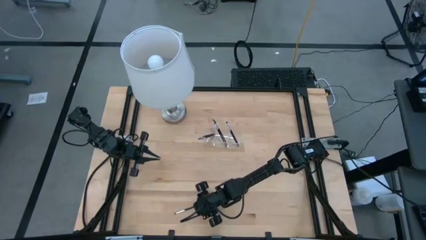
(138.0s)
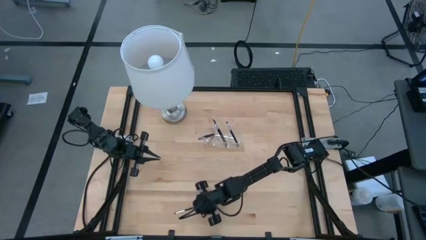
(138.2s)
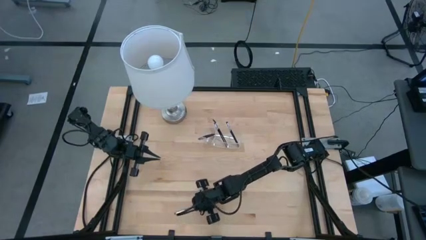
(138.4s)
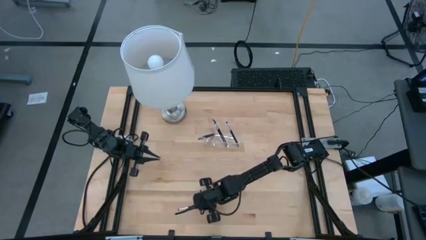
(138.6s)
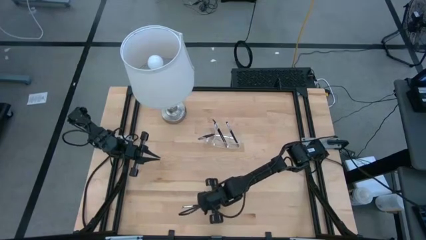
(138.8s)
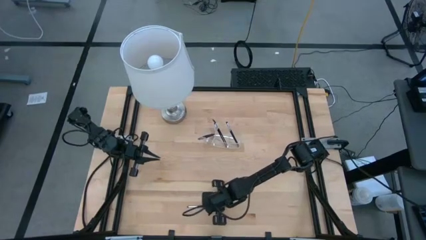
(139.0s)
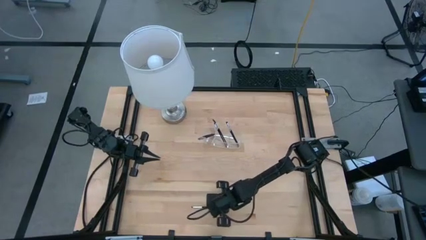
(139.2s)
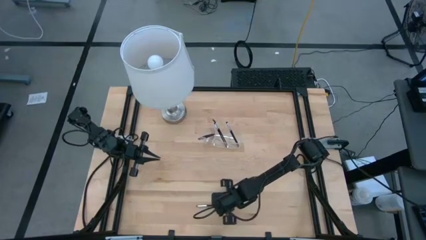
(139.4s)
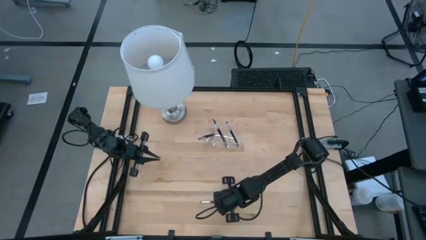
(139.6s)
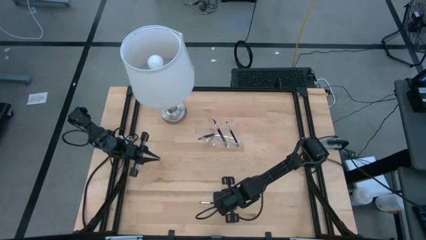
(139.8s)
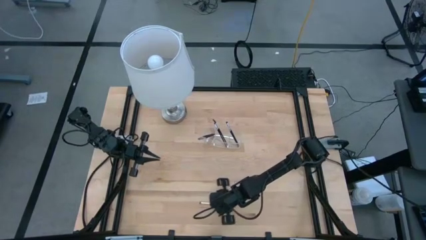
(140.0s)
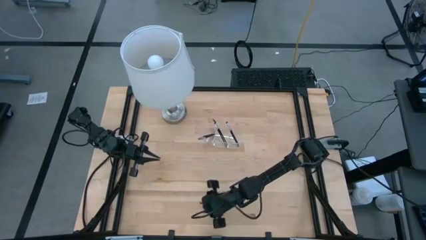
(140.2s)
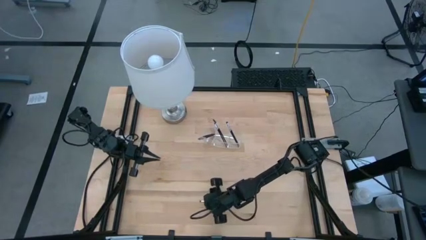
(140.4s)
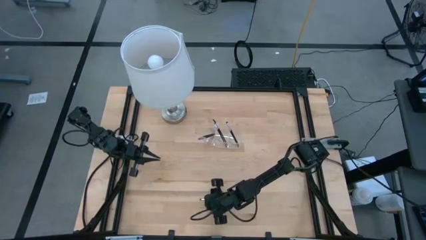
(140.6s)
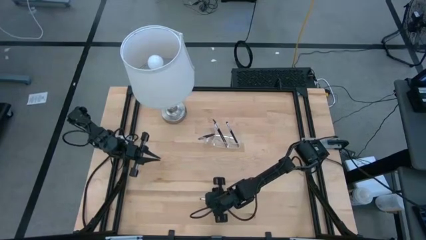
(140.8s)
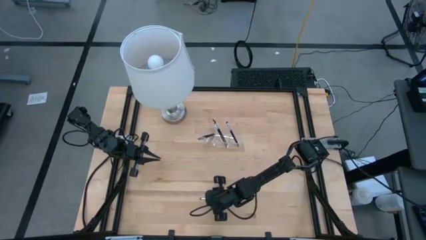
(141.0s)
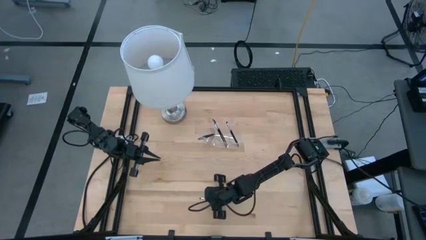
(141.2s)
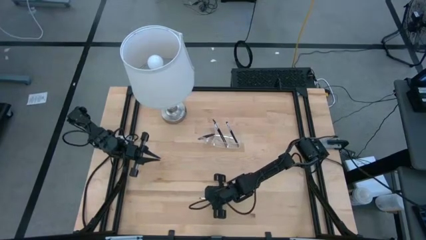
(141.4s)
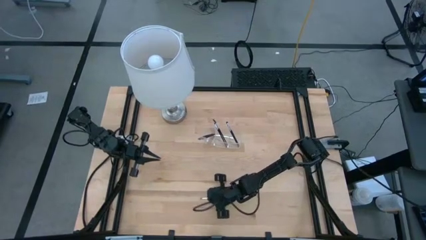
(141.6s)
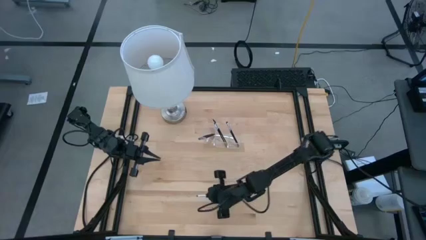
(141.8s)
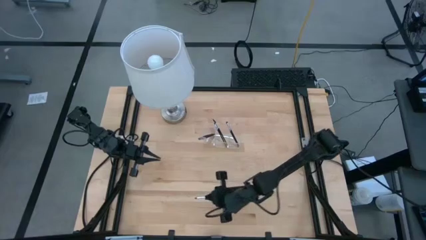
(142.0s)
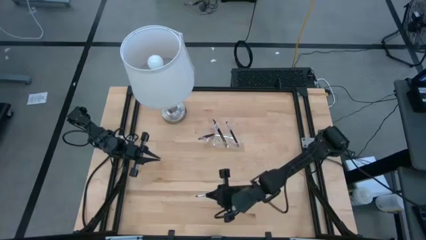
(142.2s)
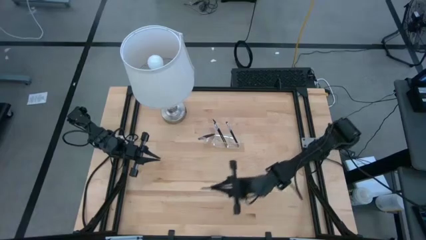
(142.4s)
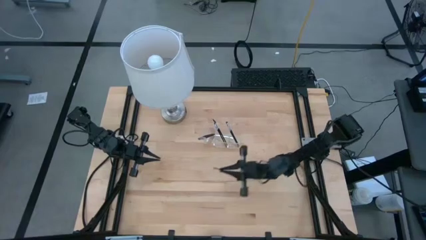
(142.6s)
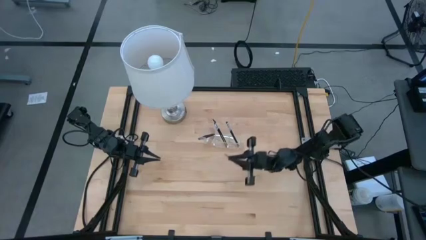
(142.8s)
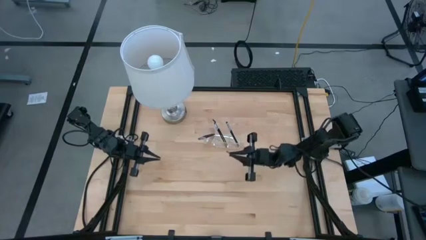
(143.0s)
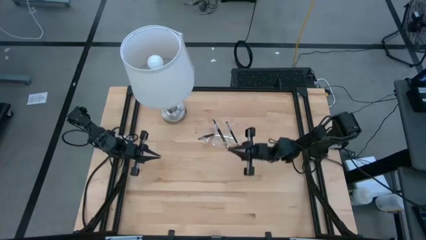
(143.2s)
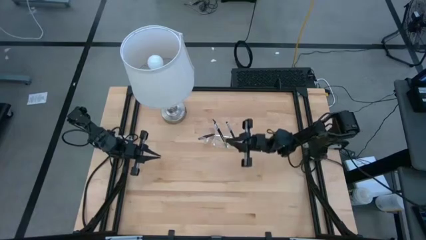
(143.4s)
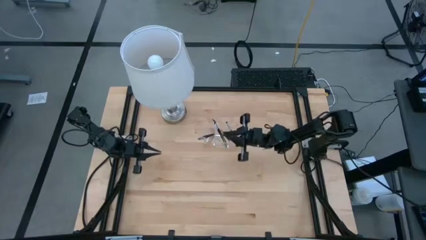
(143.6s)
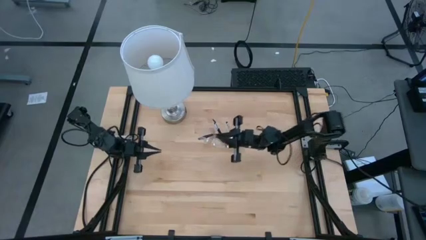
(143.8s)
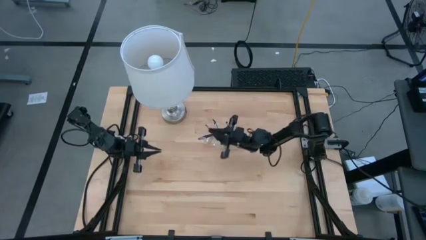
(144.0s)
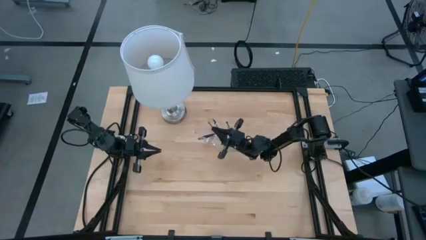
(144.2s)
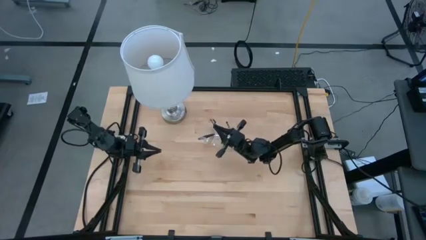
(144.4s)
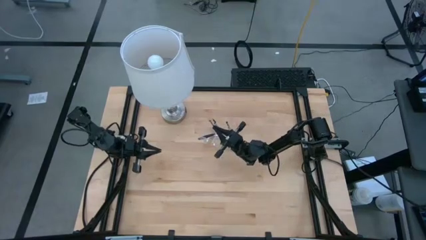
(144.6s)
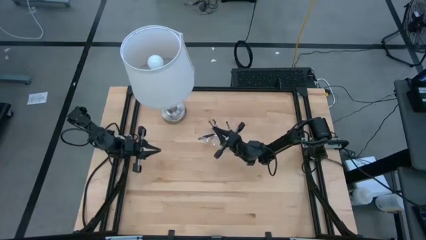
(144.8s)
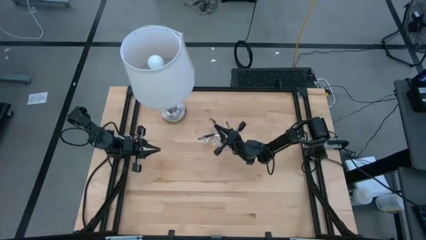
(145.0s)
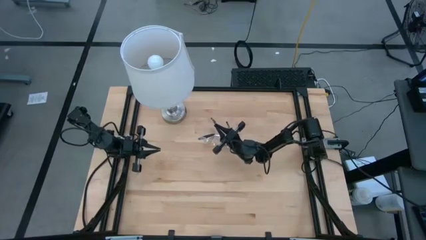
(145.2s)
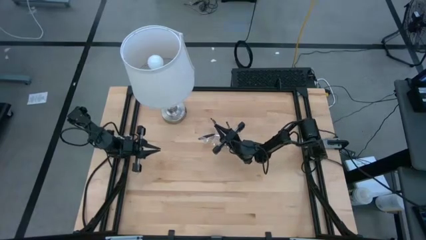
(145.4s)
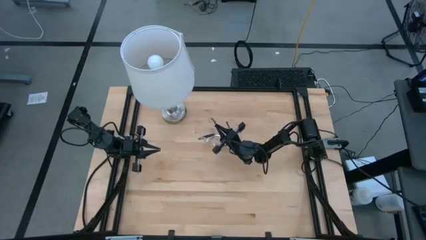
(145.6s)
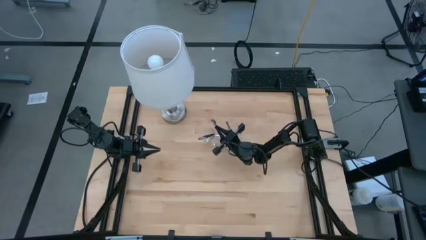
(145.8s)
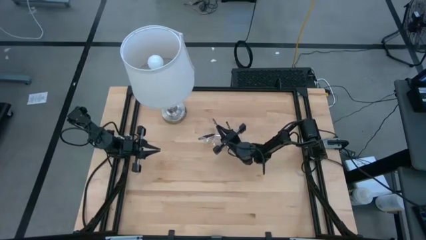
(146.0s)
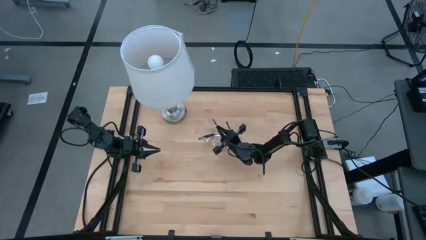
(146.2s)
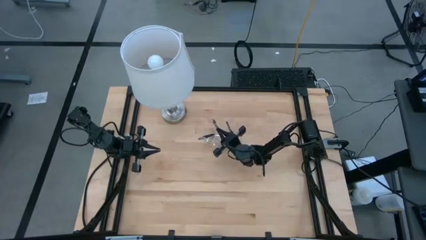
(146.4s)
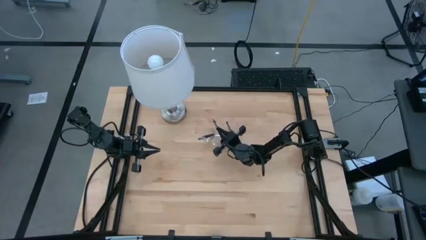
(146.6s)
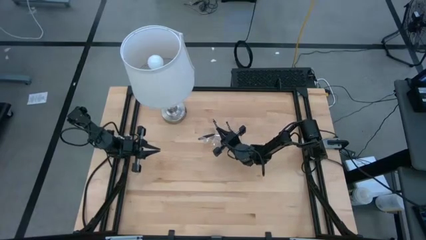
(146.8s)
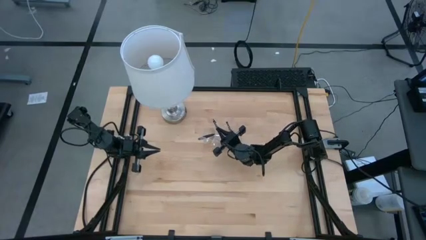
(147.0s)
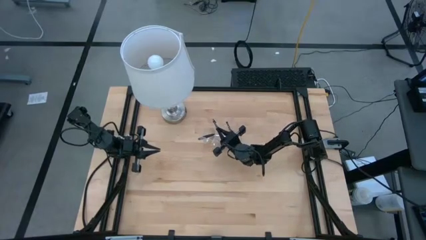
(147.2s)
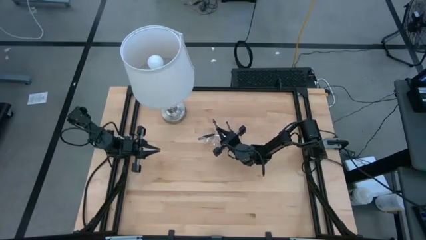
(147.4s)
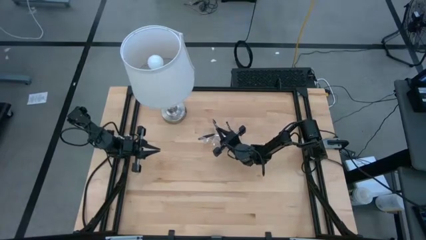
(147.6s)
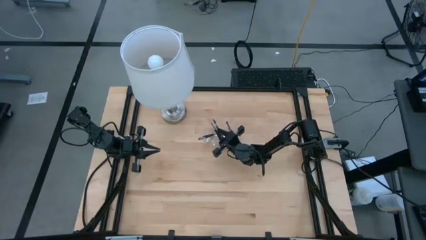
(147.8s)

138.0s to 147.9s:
Task: Sort items
Put the eyeshadow brush into the transparent organizer

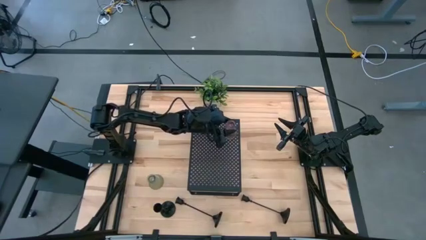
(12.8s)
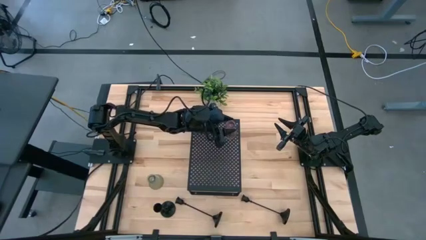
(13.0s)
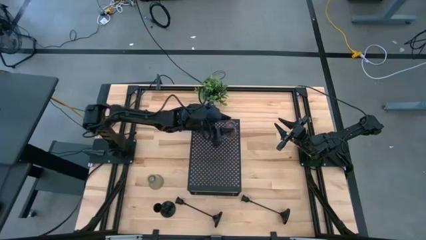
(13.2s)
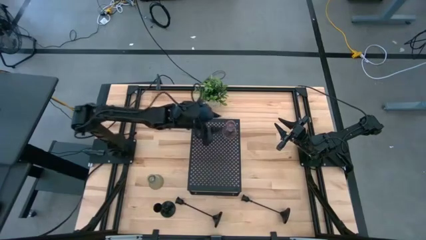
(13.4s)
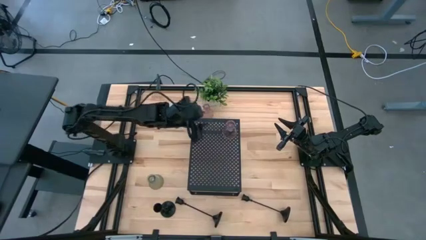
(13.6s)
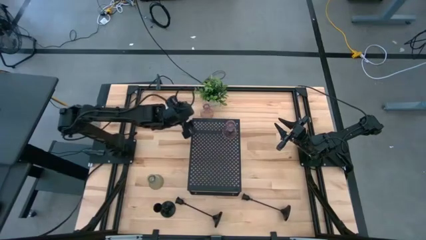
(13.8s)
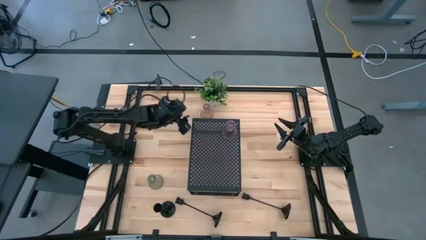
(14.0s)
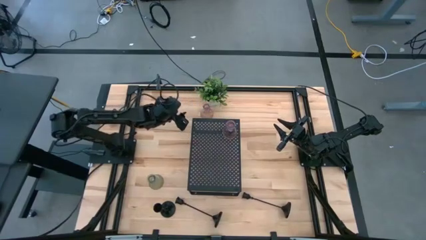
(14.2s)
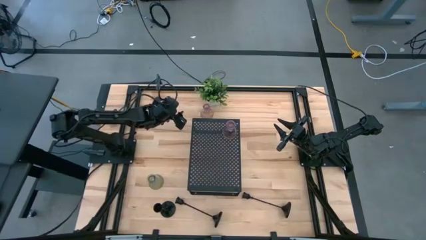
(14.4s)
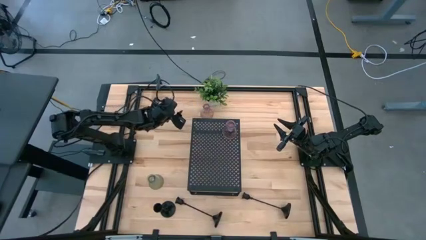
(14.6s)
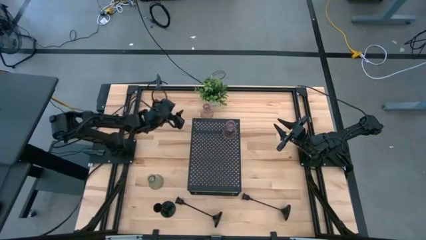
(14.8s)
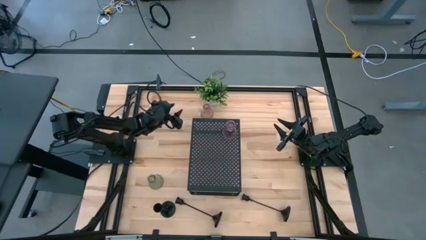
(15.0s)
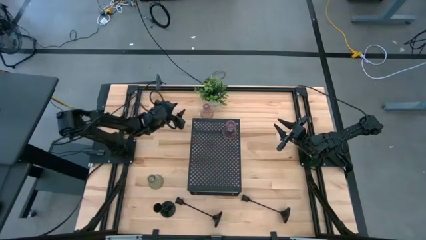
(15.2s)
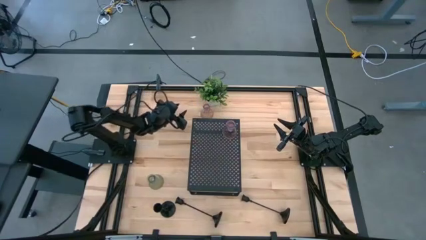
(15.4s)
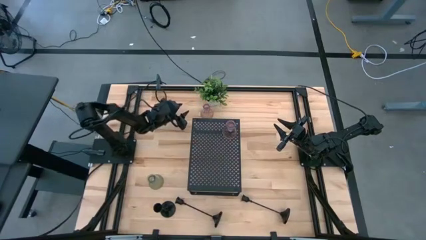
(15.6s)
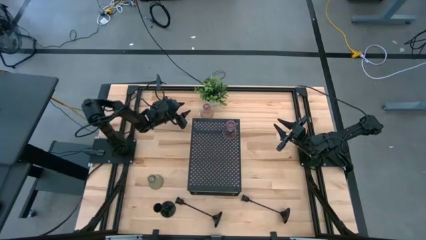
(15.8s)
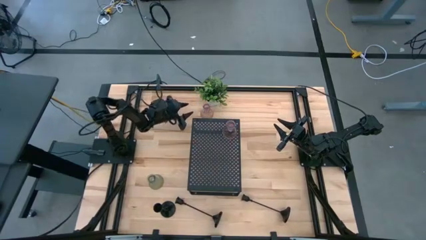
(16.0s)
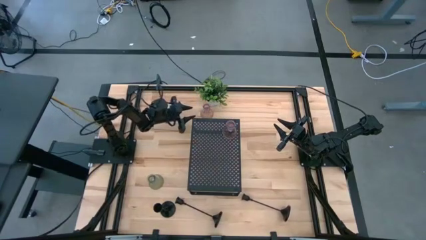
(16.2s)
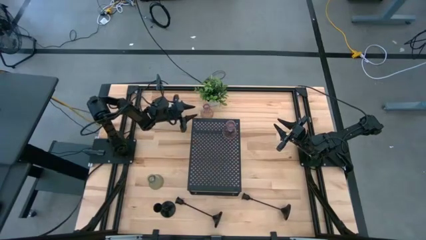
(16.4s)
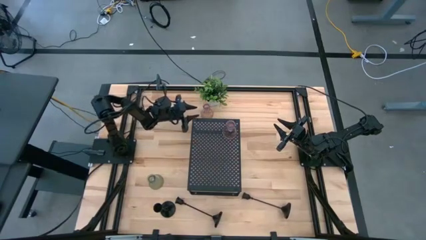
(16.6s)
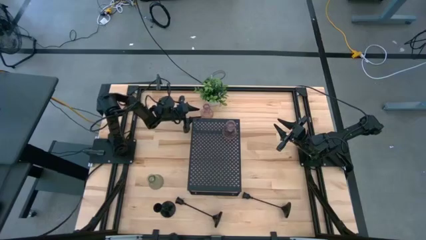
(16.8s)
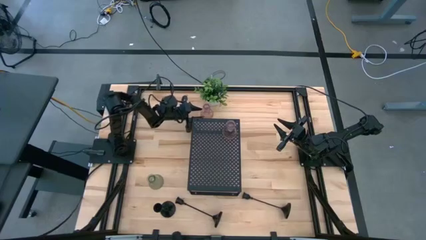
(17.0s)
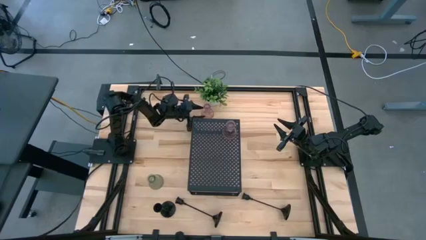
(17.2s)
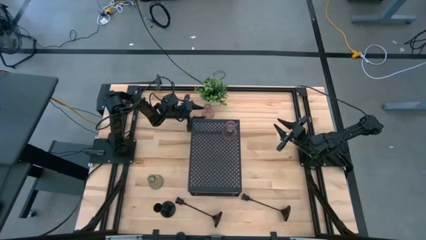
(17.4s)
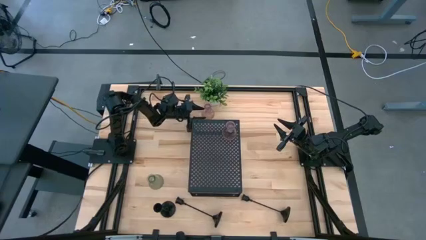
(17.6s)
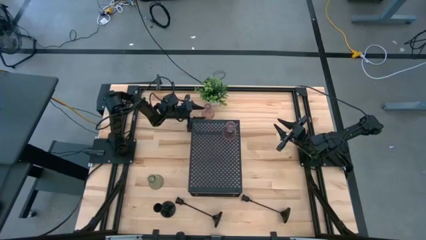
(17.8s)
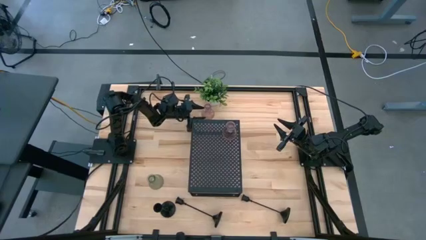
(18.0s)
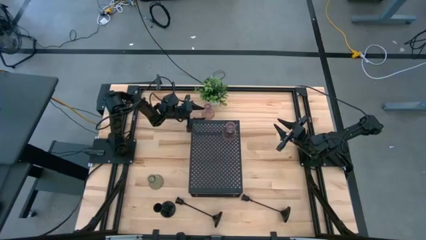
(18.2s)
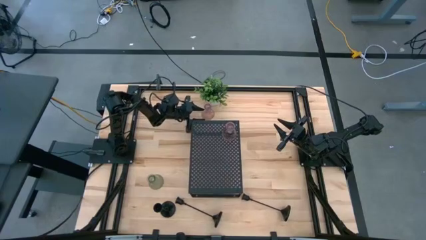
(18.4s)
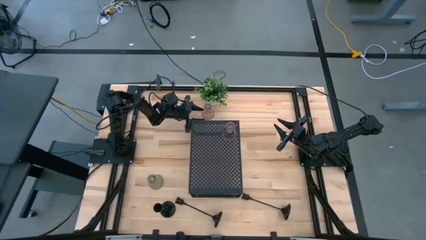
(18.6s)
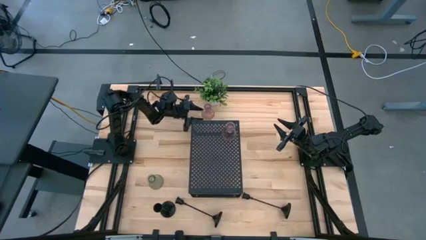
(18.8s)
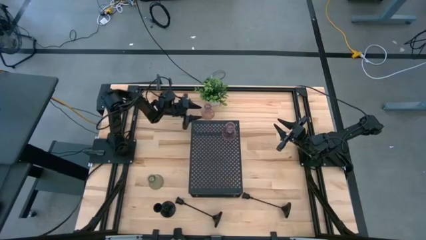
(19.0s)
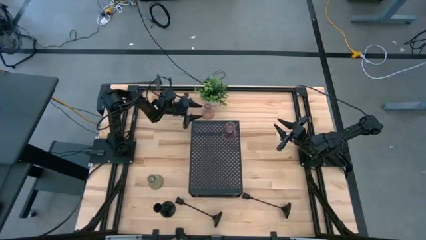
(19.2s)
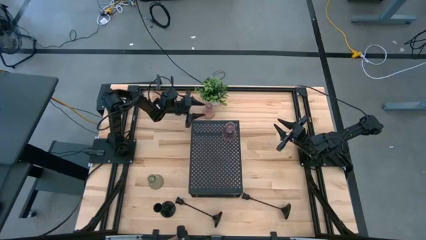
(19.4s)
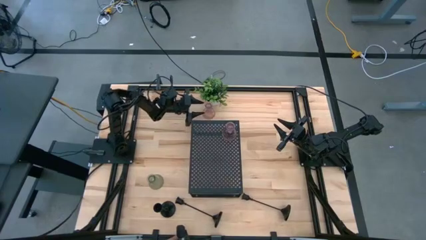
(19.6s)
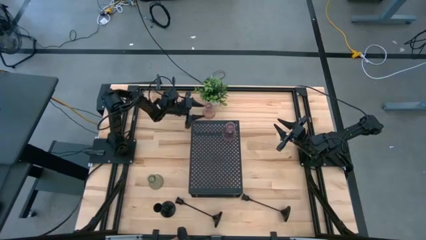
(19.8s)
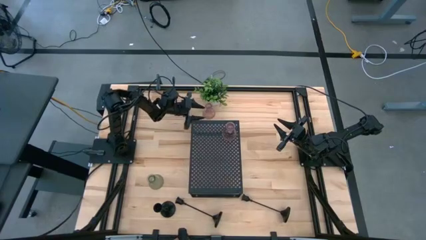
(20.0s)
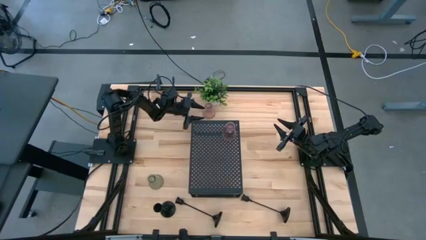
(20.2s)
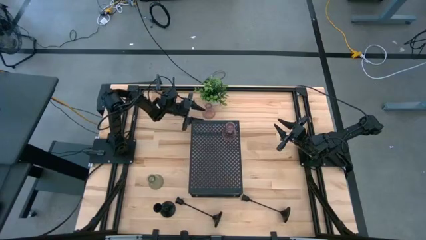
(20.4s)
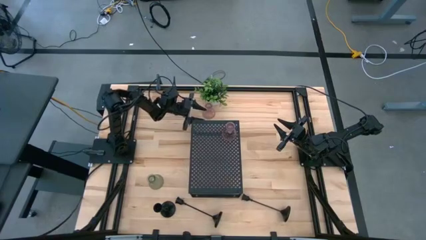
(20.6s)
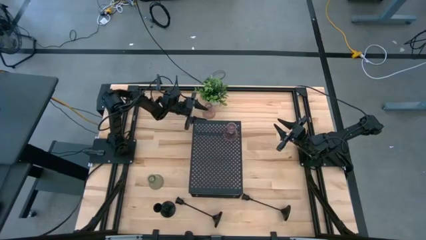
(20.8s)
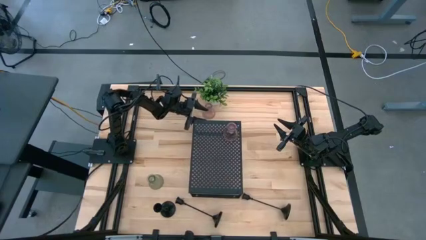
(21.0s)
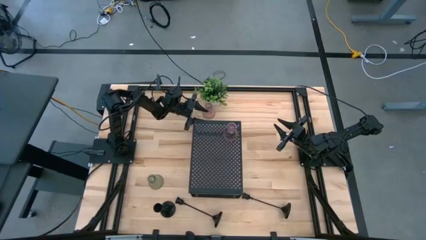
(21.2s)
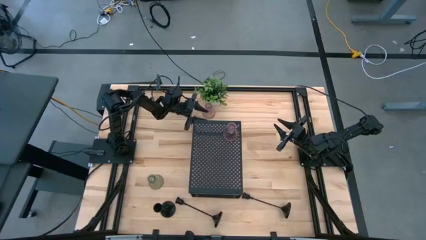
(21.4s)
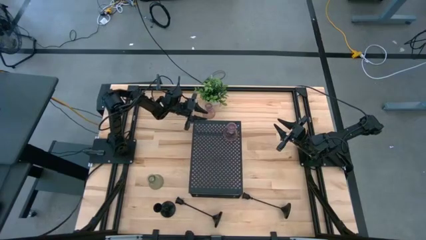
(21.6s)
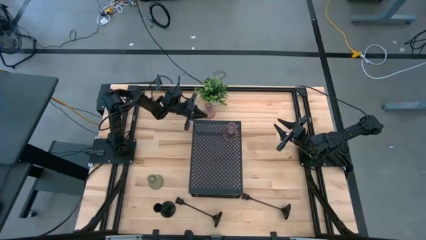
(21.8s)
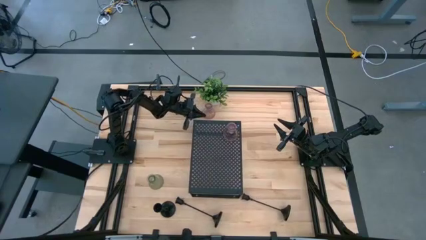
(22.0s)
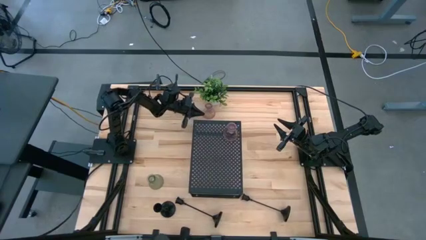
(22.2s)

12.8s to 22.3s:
Task: Pick & Place candle stick holders
Align the purple glass candle holder with the other purple glass candle holder on the shelf
